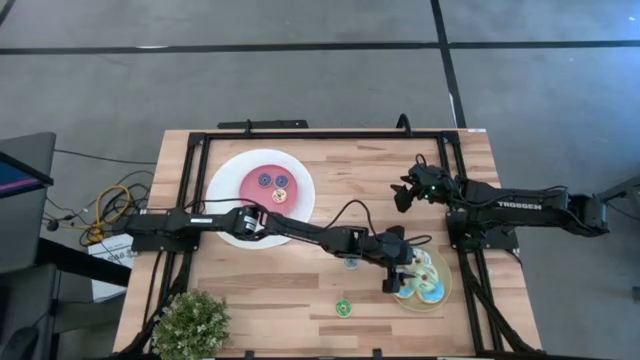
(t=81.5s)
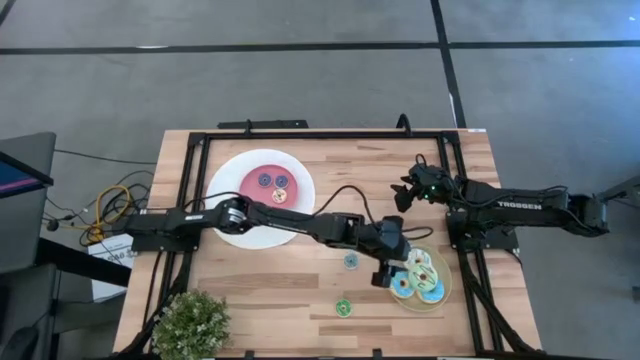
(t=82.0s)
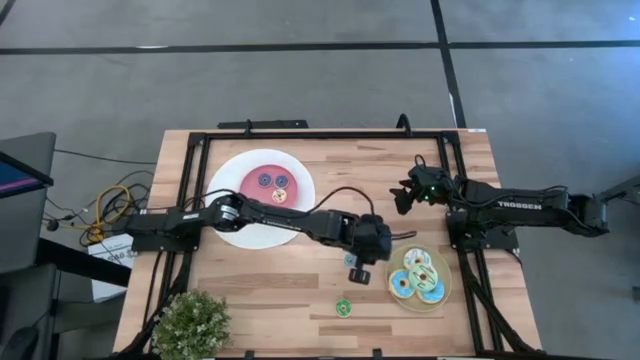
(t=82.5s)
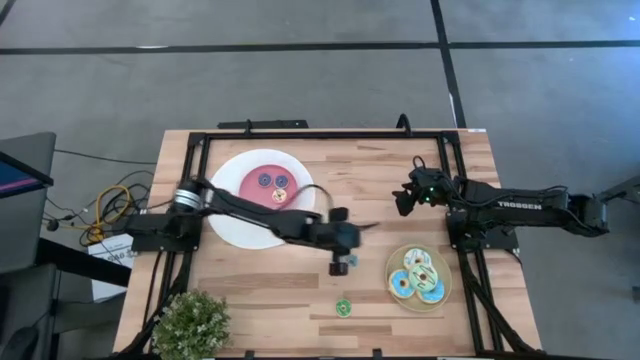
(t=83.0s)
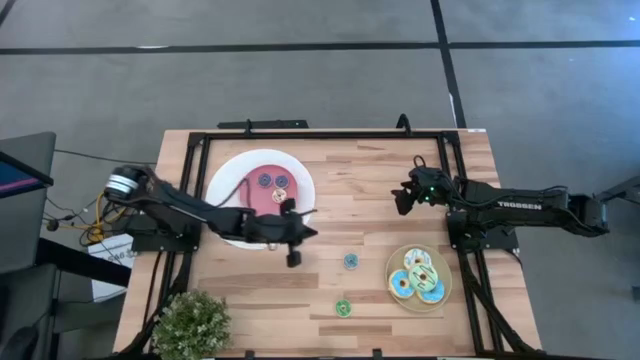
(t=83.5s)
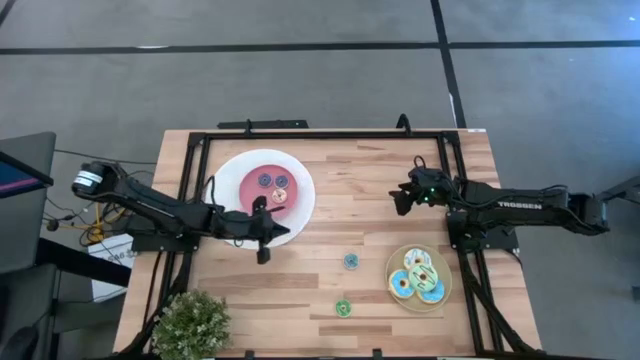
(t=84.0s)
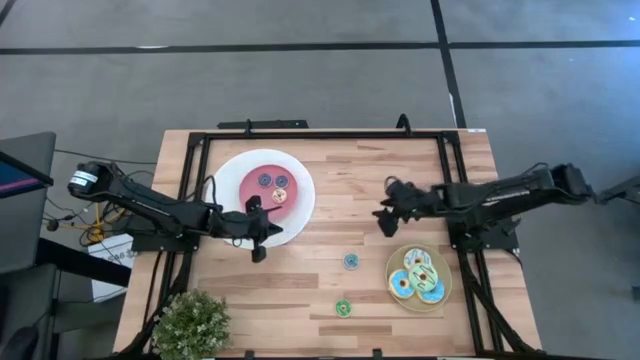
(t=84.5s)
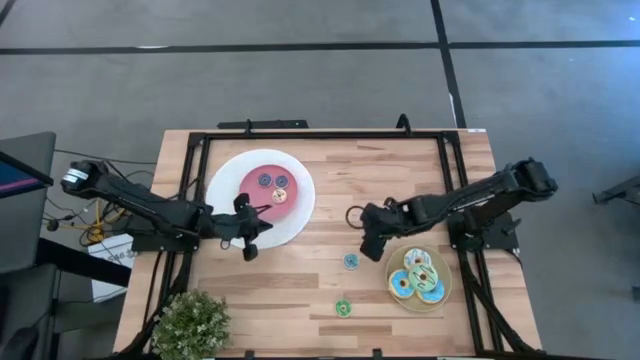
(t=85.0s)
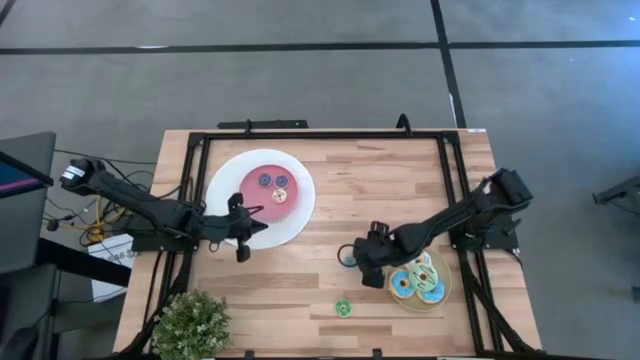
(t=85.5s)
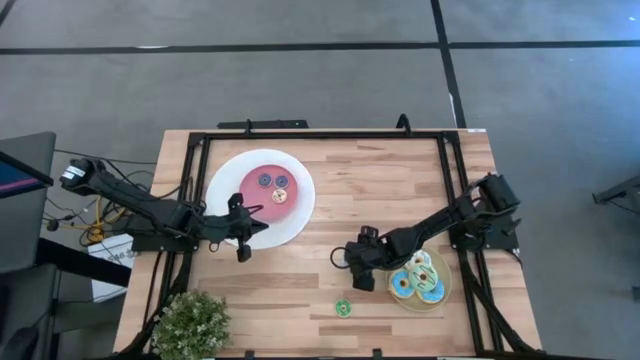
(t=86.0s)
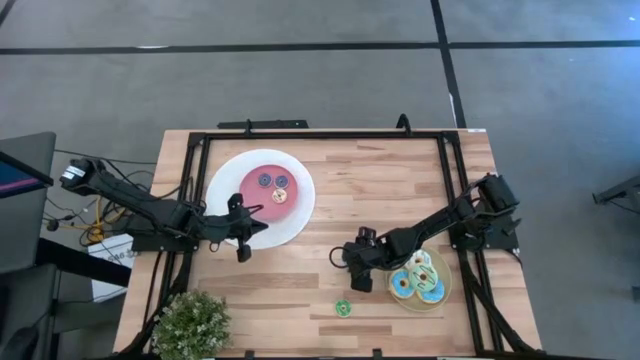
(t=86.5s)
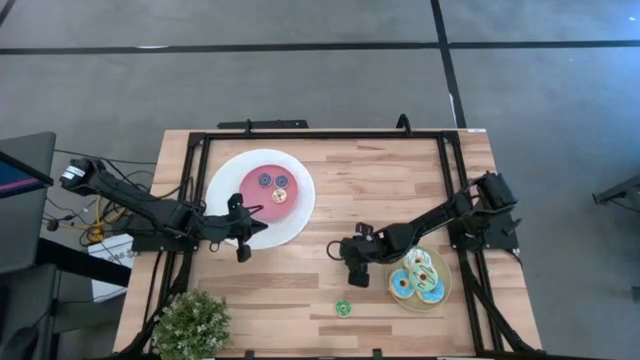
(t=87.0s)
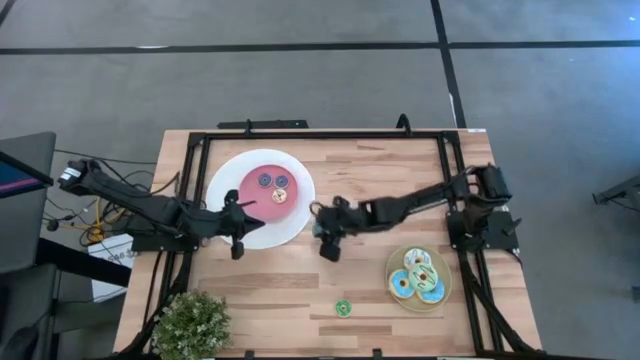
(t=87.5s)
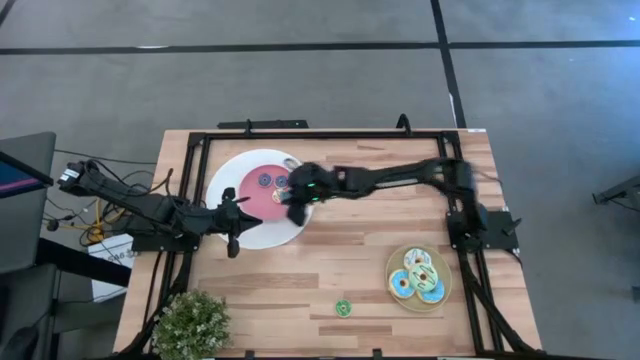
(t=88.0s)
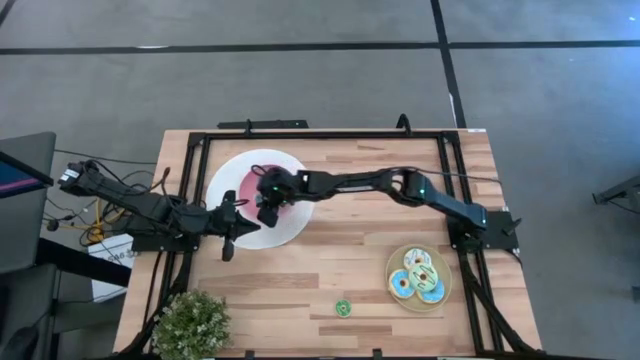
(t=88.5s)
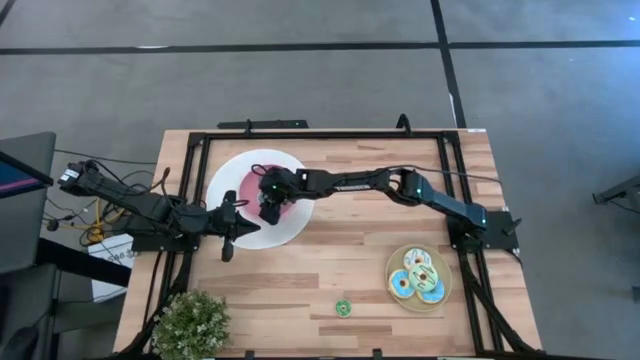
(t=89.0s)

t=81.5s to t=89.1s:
Task: Pick & Place donuts
Put the small light blue donut onto the pink plate

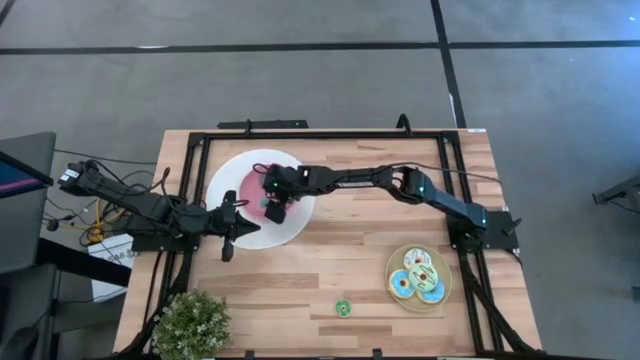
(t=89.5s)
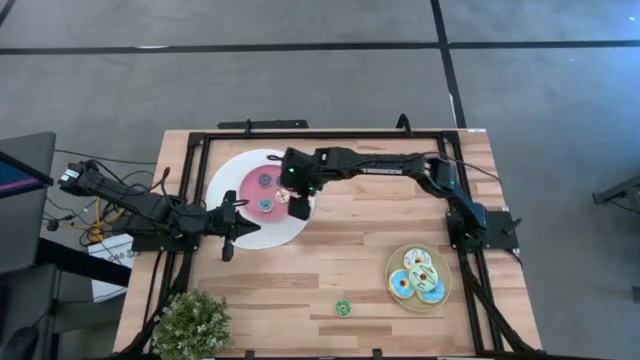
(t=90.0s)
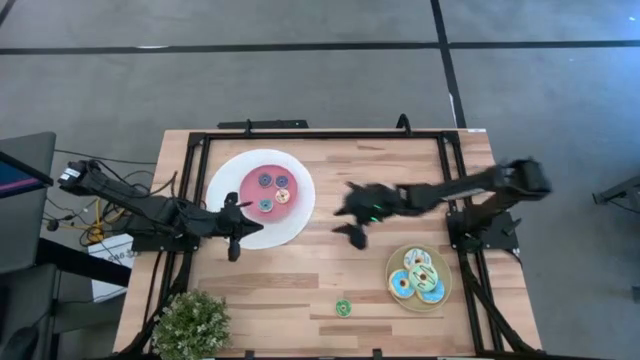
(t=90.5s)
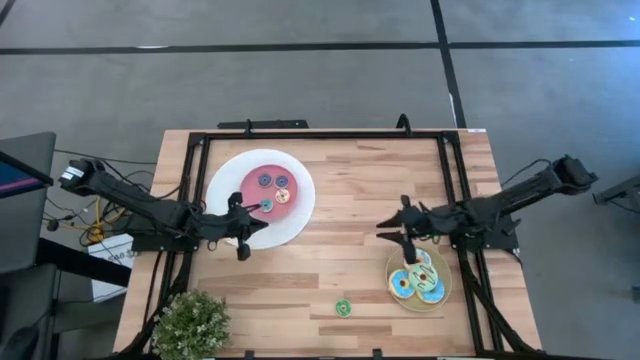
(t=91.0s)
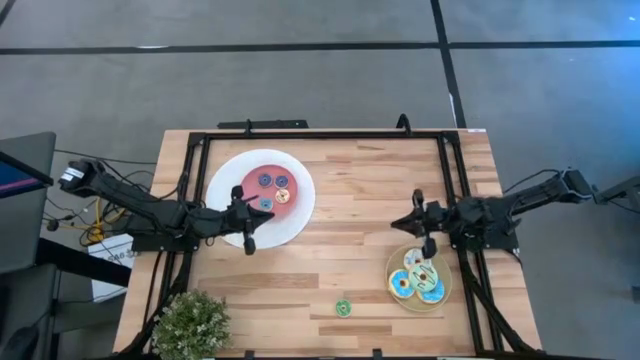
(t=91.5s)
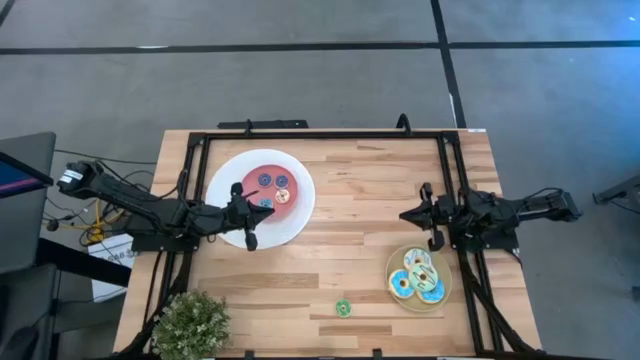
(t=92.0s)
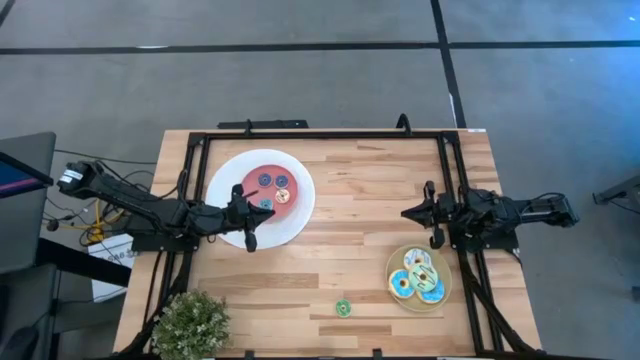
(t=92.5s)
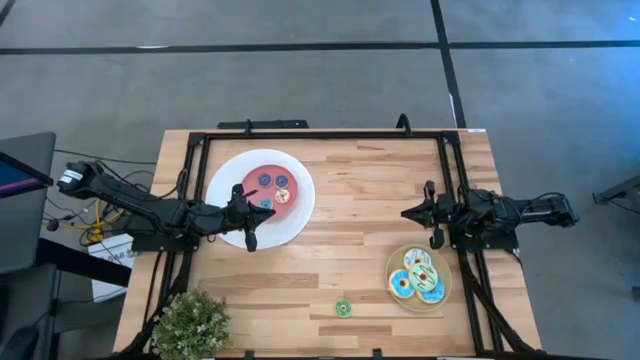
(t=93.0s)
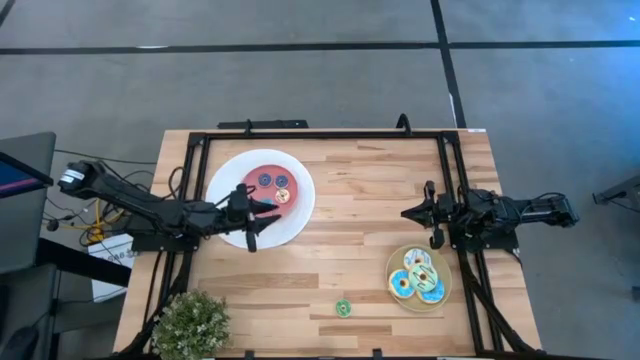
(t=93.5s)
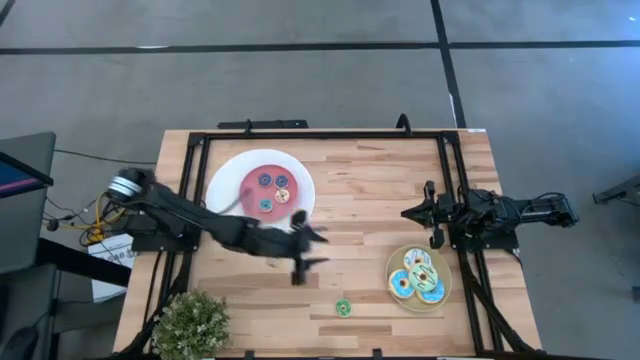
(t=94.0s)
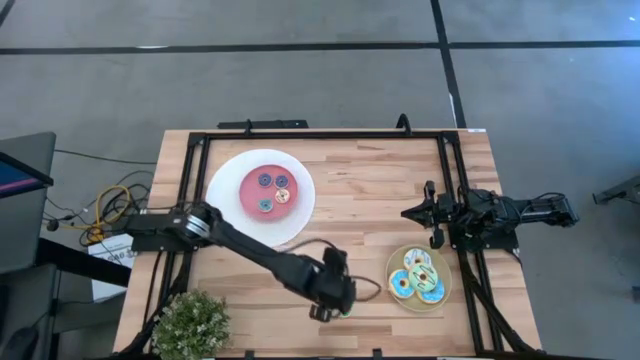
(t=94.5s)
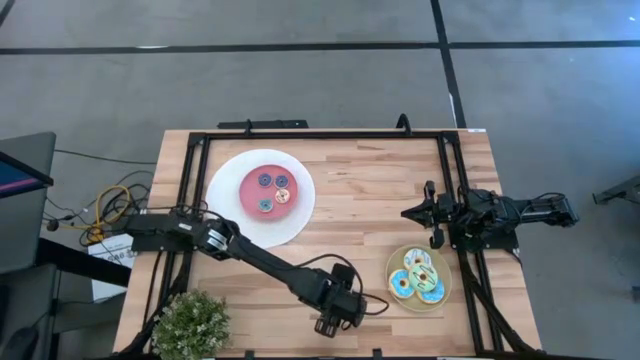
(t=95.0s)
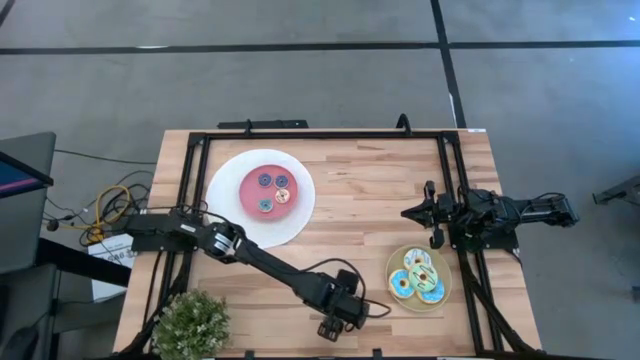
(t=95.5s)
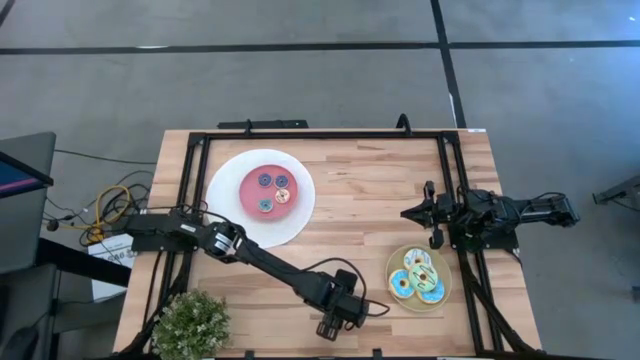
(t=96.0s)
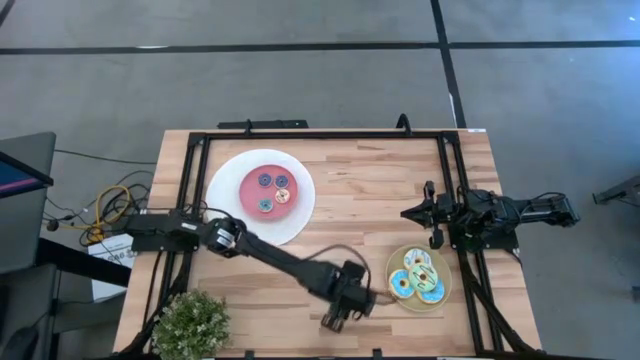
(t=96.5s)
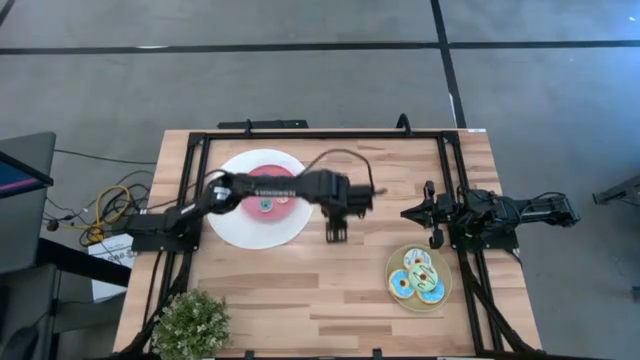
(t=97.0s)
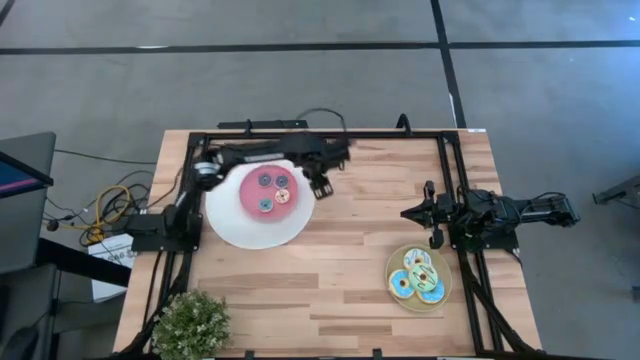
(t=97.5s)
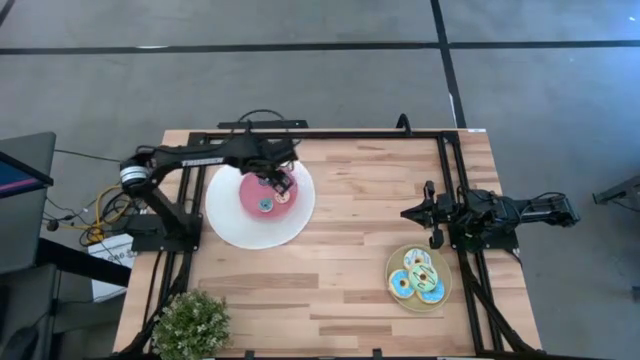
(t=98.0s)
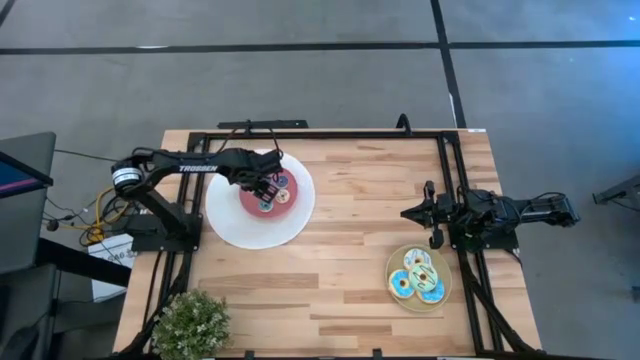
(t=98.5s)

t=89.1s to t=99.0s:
Put the small green donut onto the pink plate

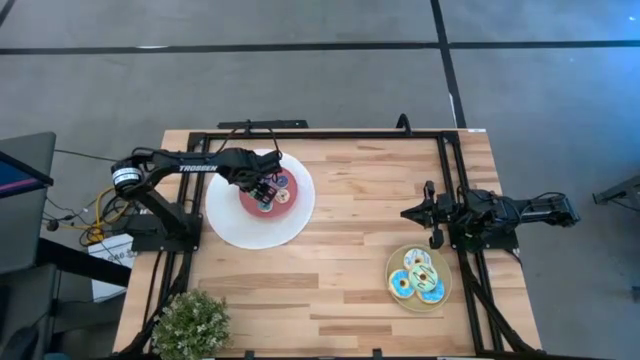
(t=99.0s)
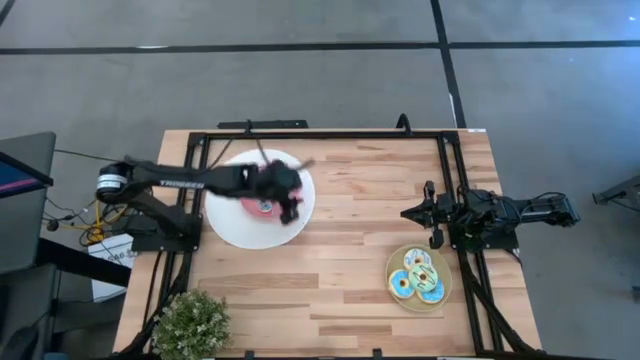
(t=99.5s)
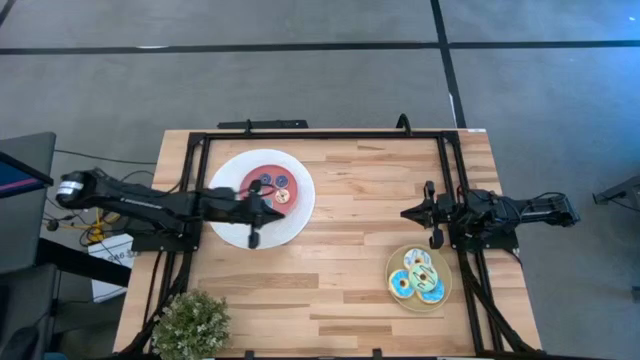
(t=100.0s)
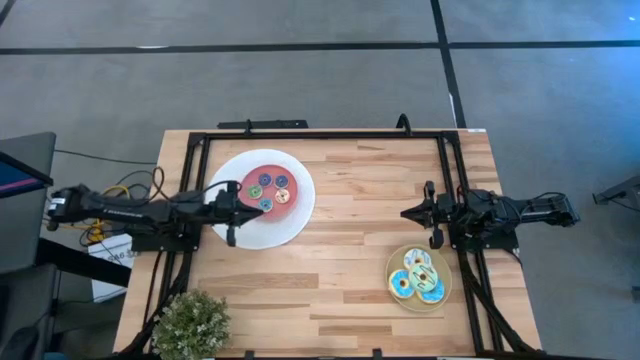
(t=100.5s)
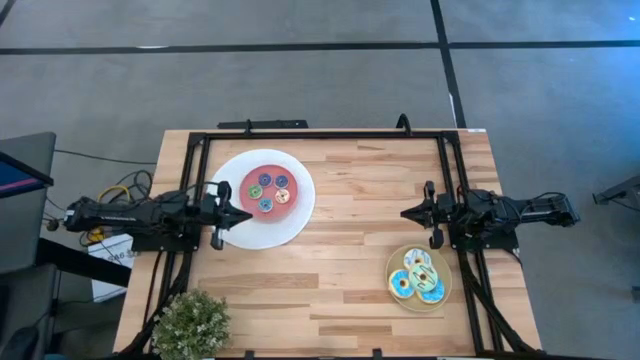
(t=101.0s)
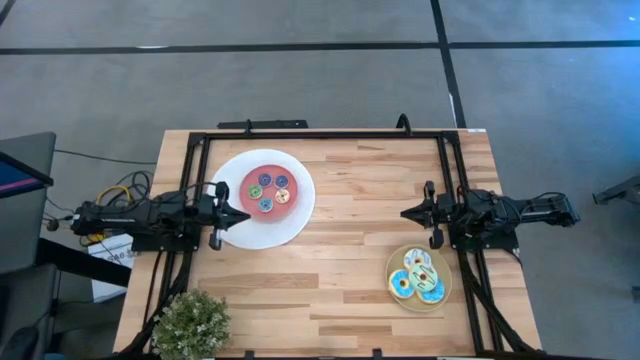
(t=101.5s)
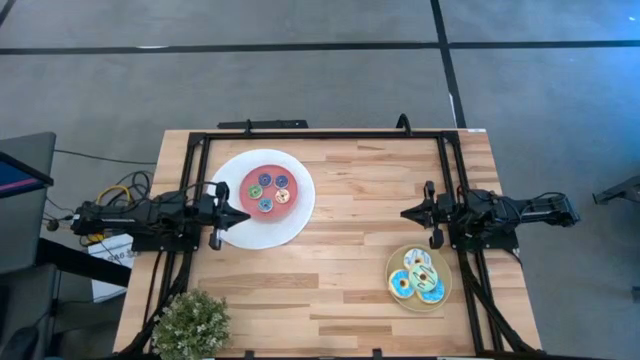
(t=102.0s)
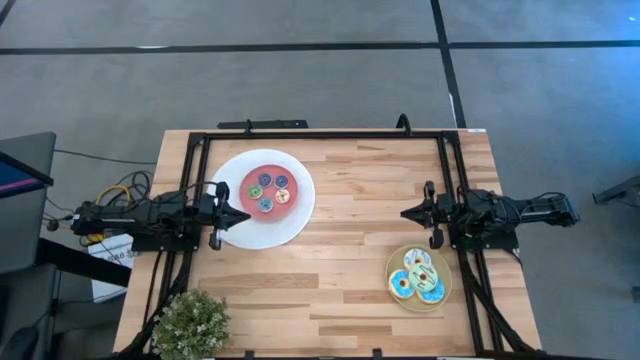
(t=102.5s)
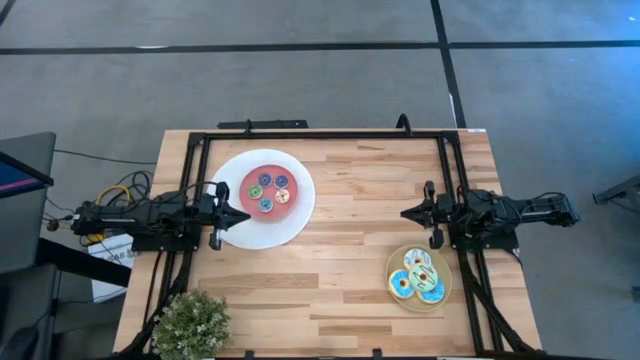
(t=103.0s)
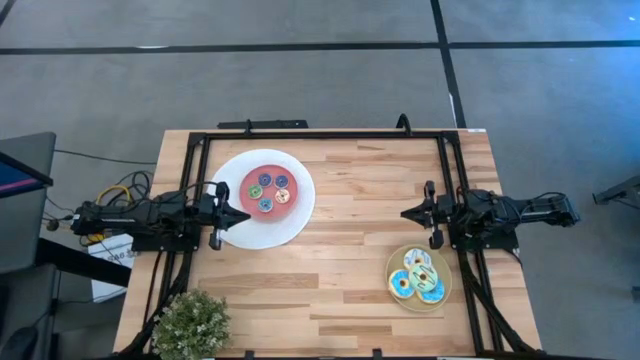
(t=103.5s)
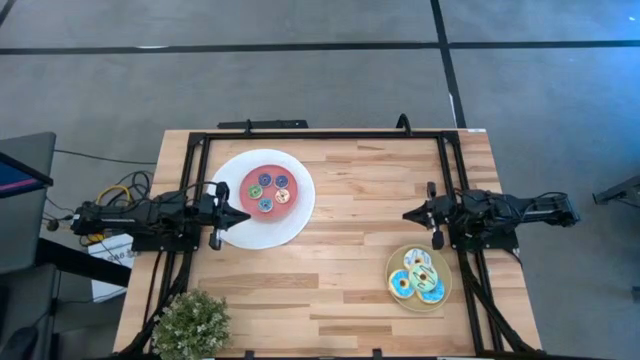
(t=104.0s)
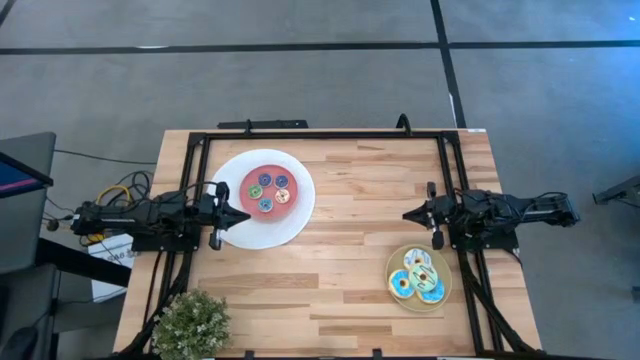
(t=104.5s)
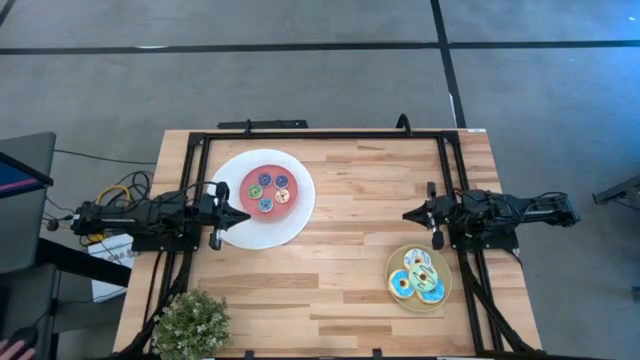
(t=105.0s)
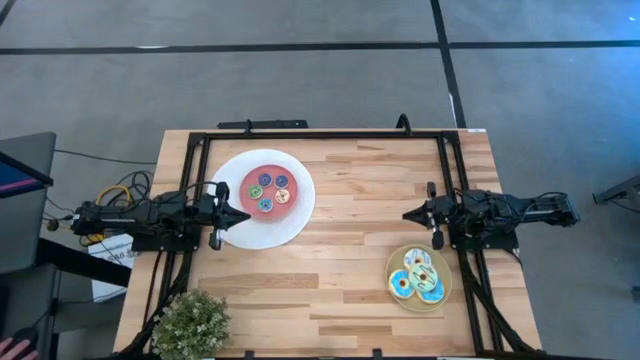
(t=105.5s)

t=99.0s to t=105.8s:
Return to Home Position
